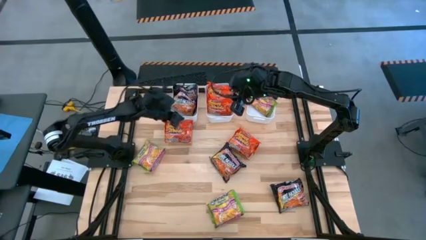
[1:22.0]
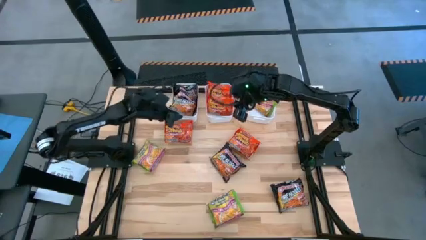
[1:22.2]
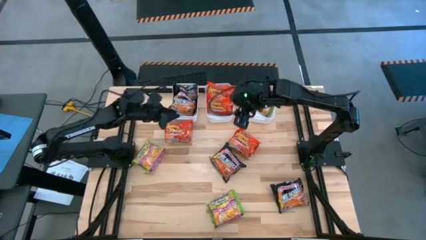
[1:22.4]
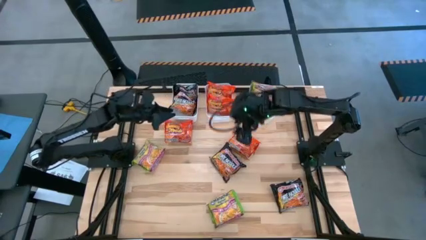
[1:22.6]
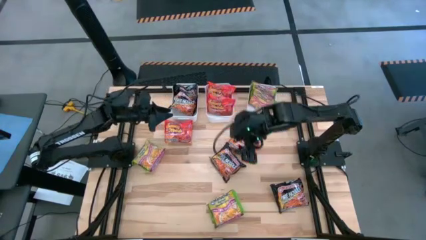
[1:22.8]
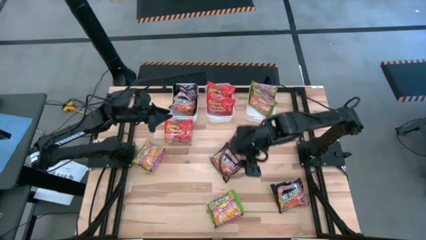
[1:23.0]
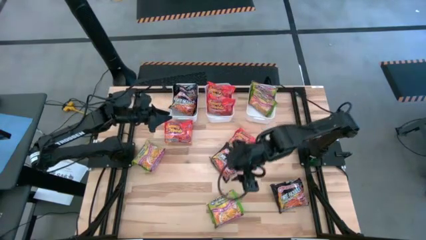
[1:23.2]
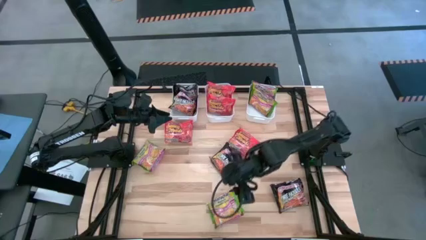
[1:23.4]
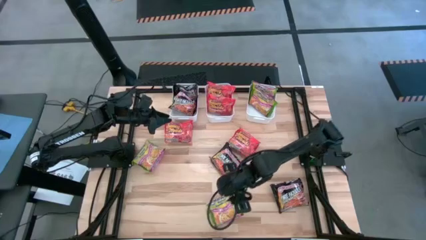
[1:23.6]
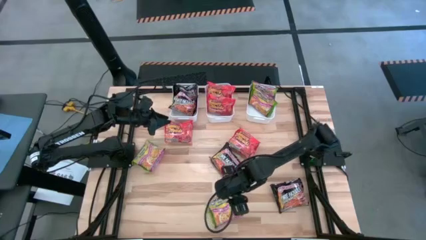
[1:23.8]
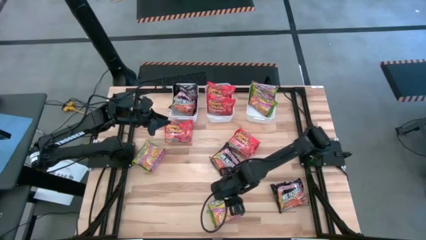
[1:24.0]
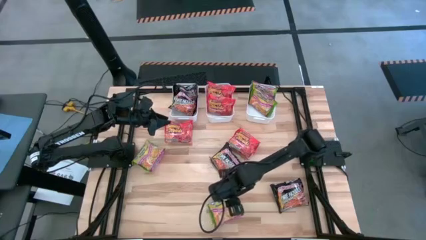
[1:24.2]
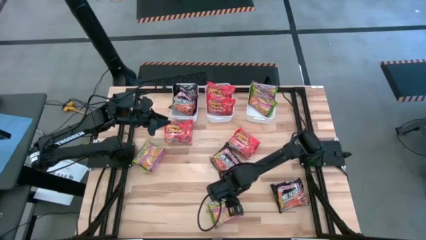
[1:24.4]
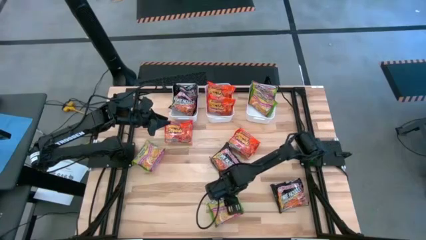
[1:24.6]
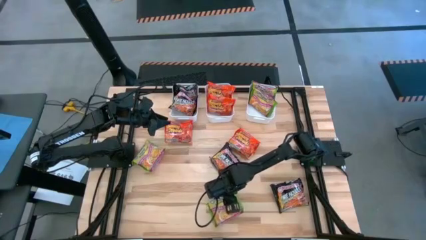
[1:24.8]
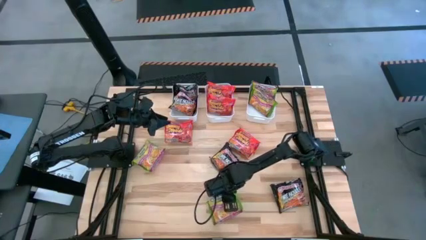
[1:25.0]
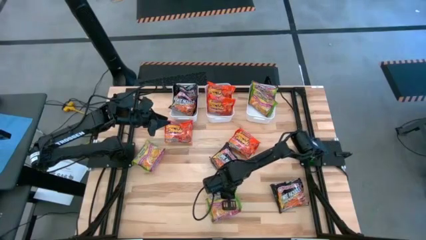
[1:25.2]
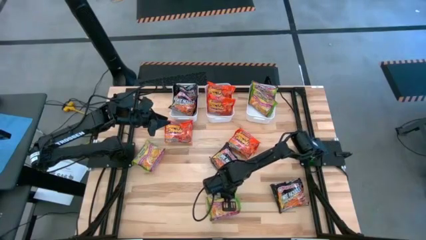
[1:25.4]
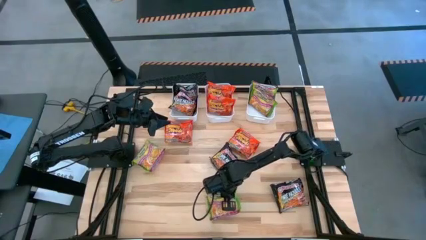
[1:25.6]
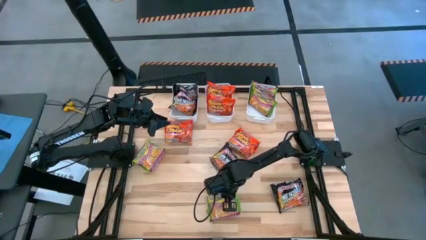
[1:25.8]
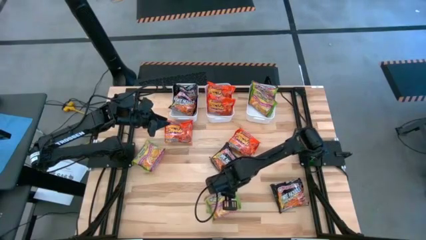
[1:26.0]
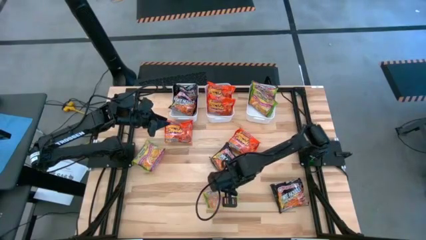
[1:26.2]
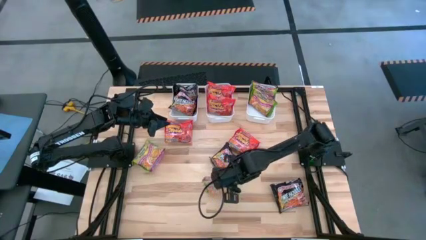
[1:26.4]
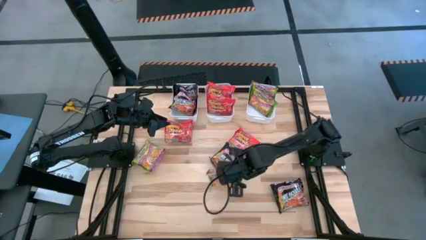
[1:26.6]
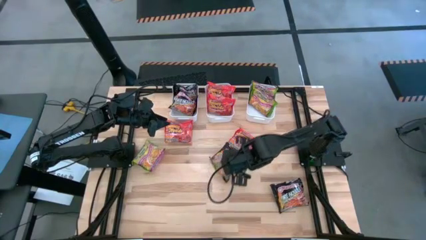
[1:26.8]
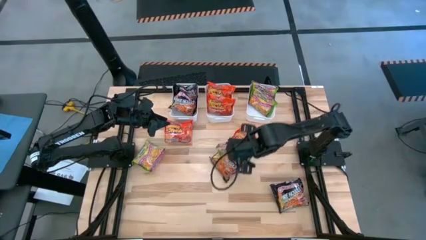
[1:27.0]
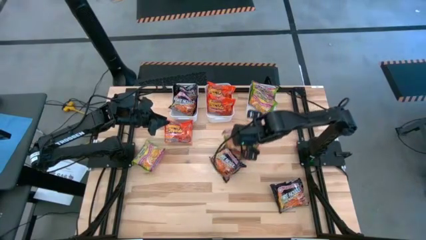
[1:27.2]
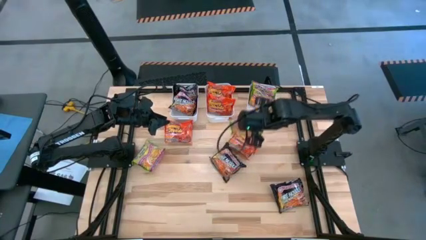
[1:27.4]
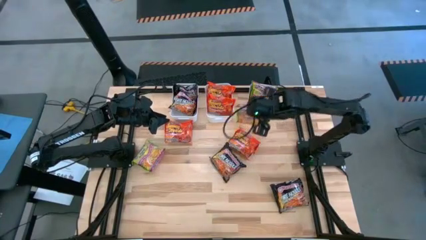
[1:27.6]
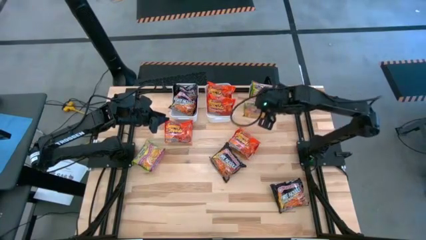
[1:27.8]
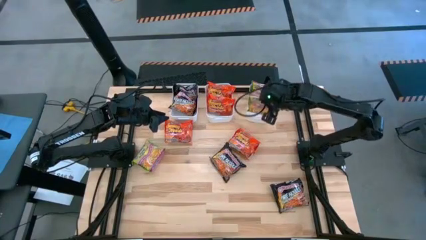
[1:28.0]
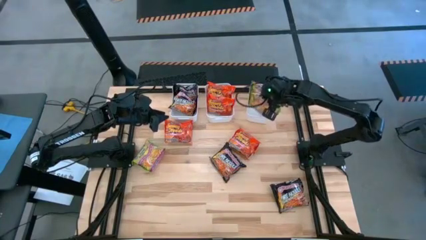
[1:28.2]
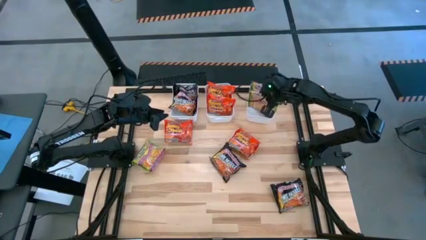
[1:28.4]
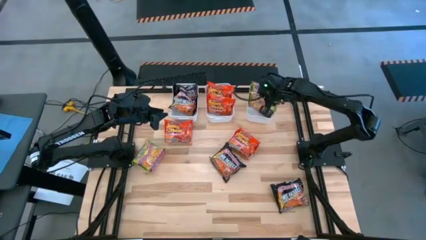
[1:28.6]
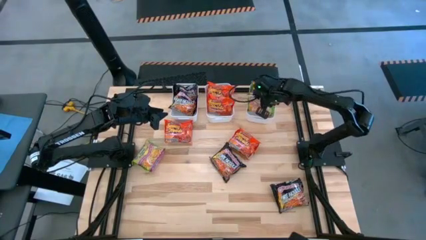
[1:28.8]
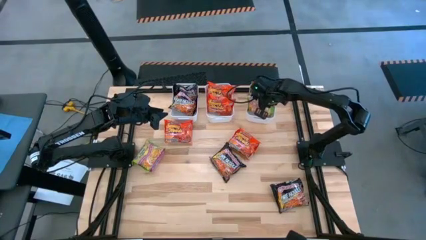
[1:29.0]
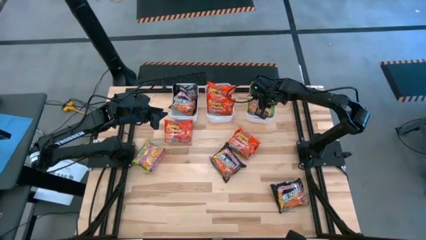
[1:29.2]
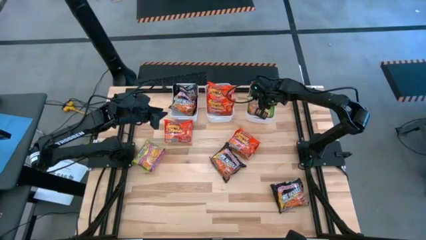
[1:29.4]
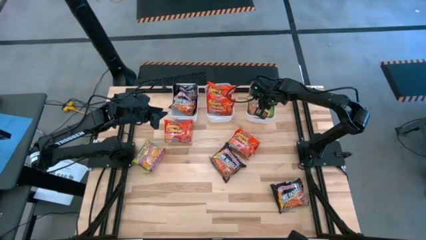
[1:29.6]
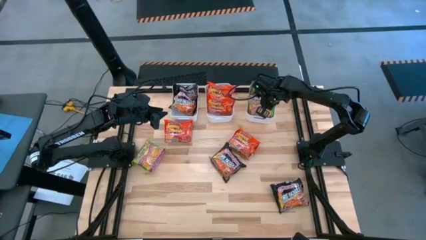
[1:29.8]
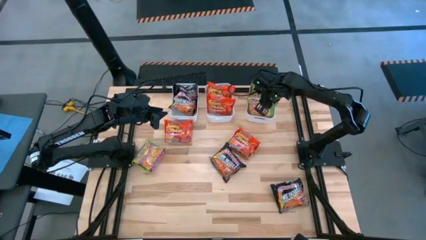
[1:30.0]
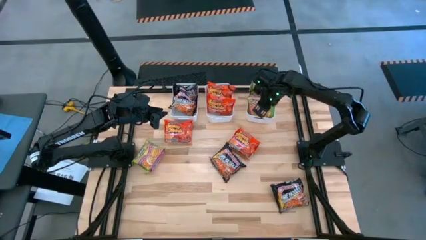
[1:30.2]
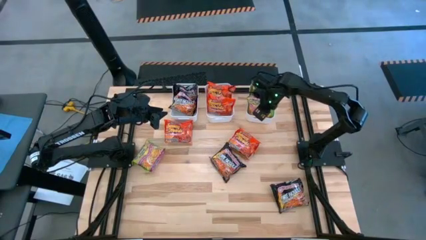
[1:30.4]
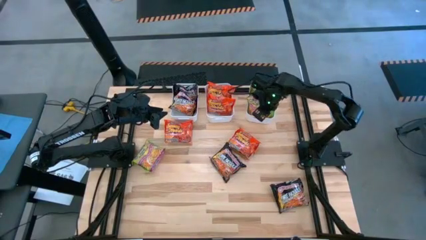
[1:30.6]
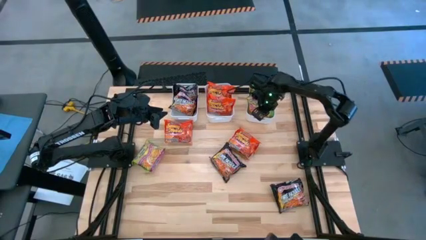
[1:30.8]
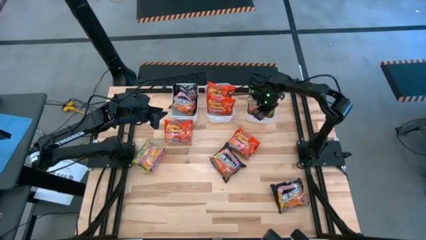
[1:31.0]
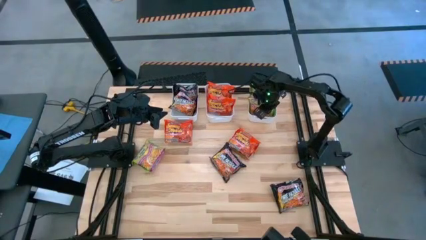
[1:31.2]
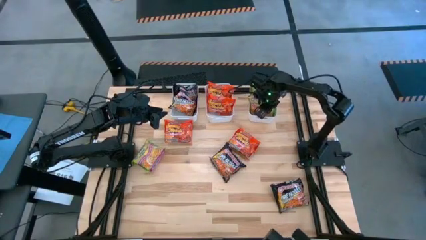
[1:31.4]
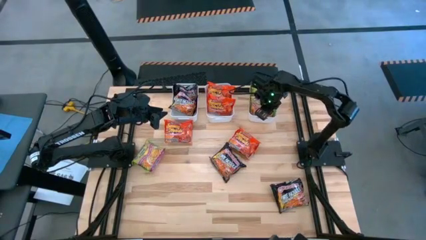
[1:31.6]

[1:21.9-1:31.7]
Task: Sort Maruchan noodles
Put the green noodle pack into the right white bin
